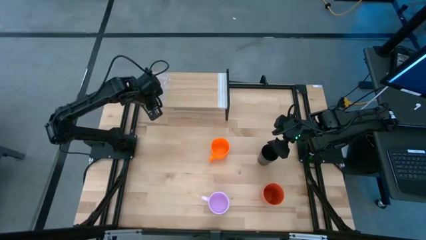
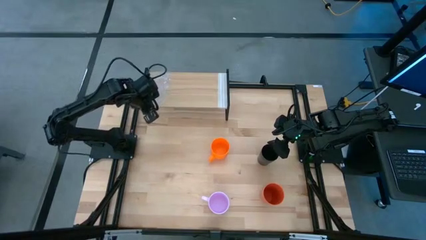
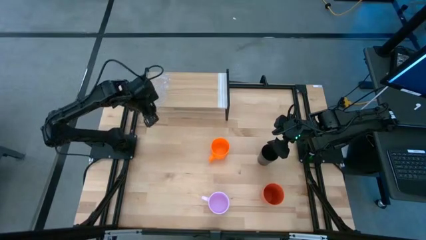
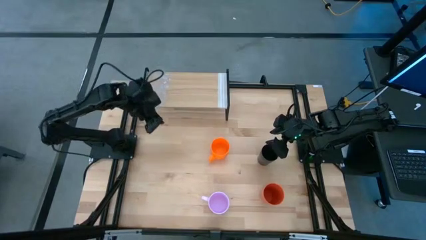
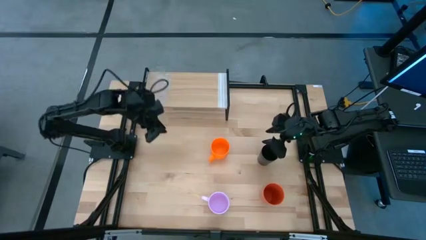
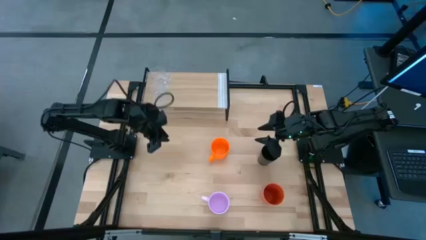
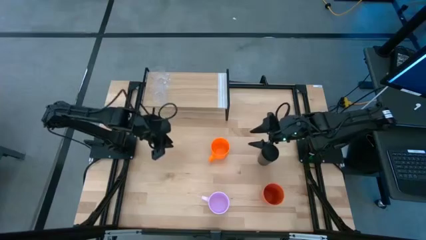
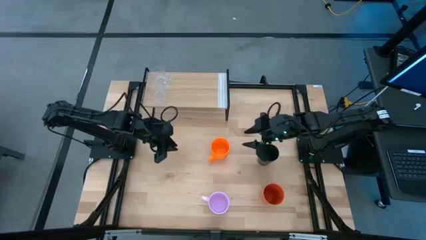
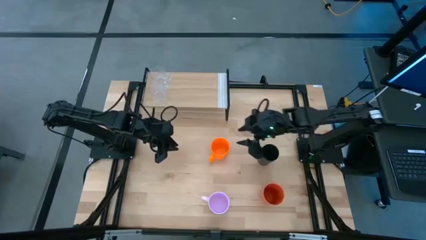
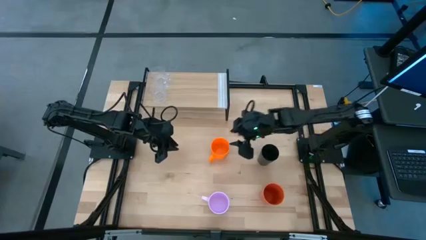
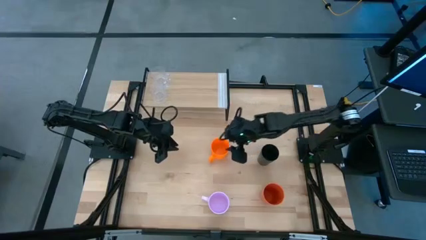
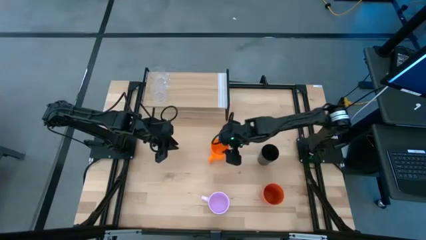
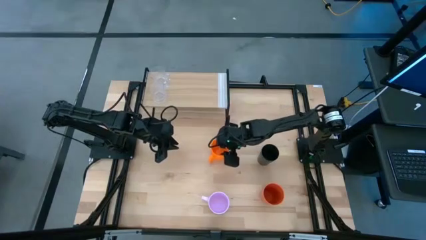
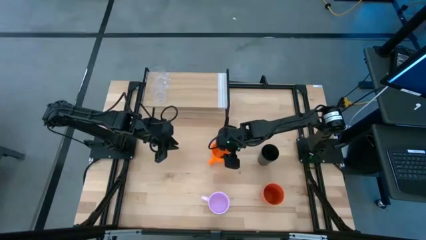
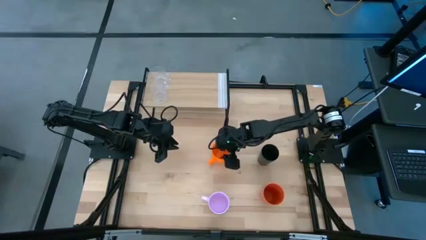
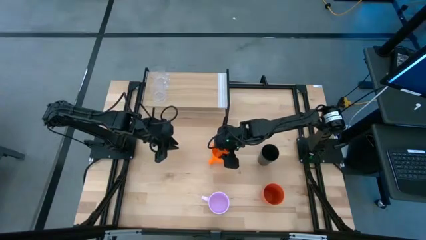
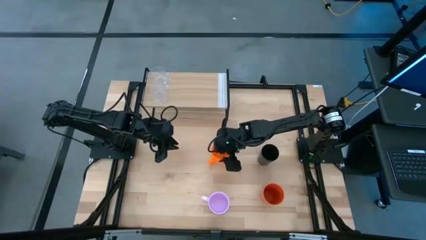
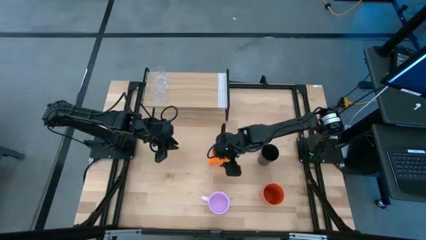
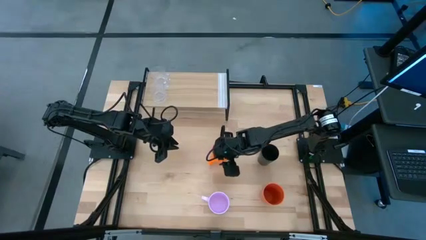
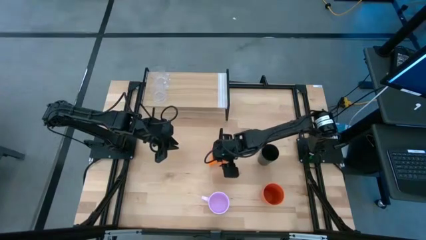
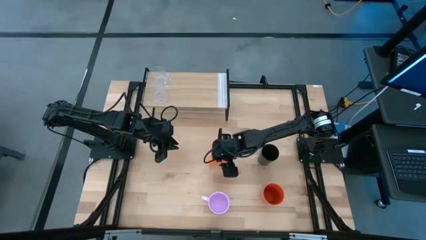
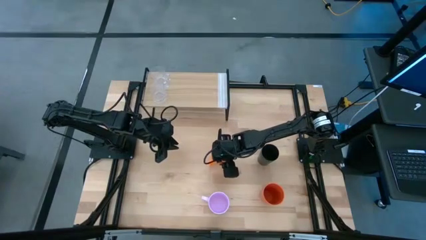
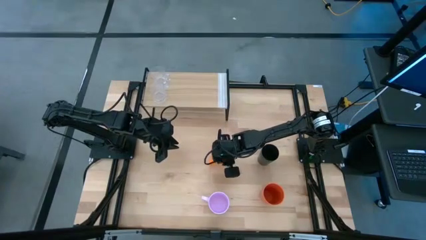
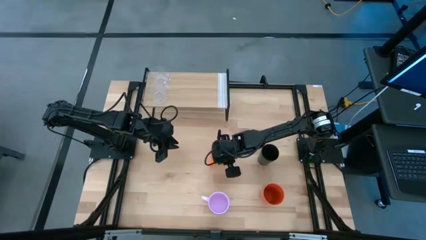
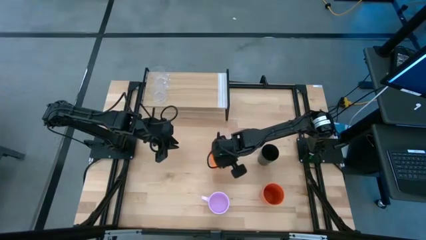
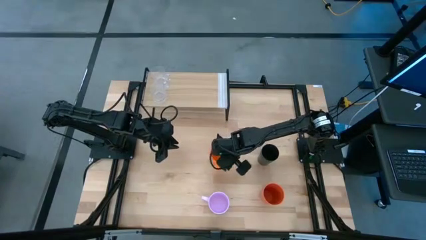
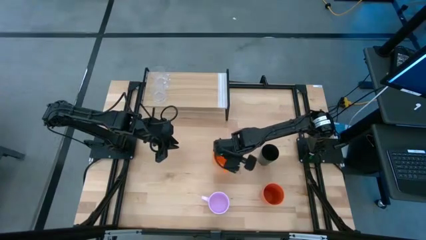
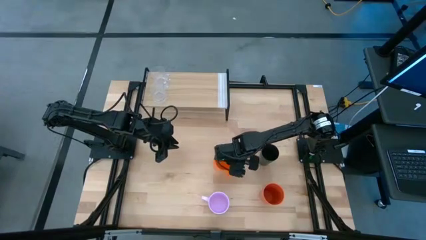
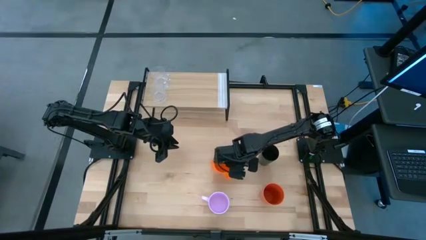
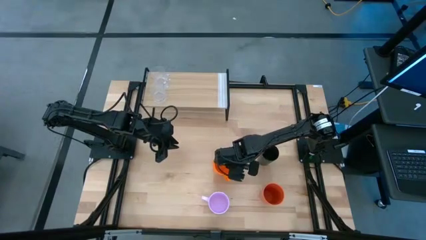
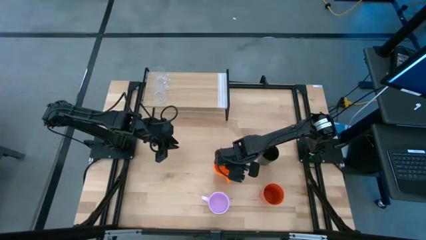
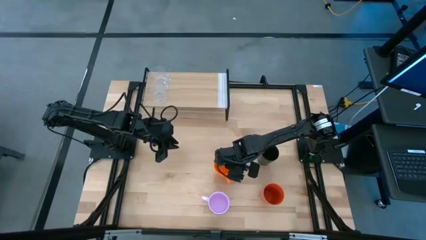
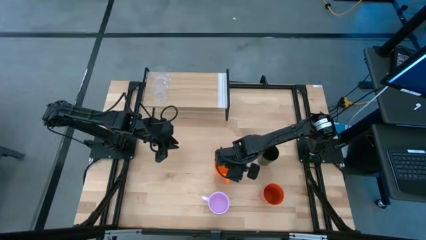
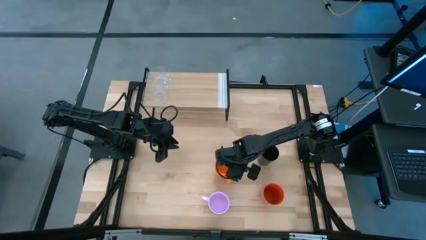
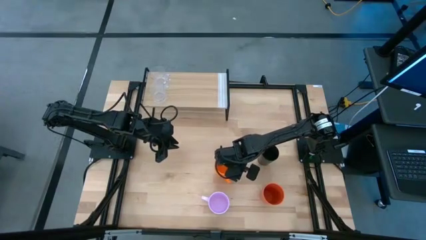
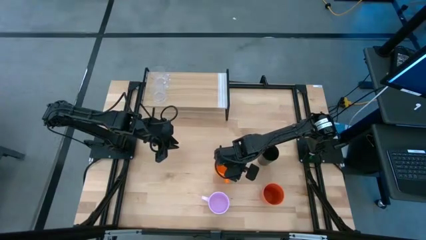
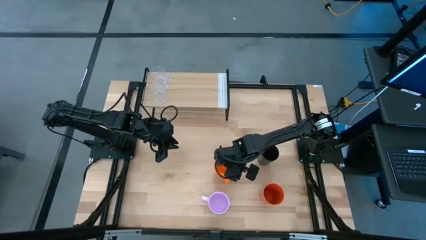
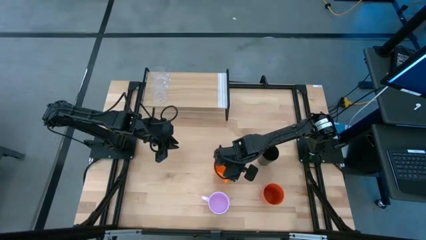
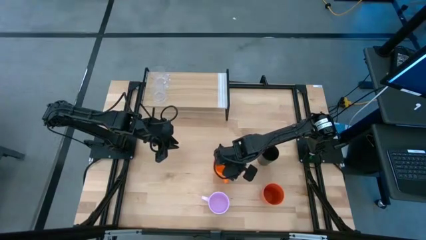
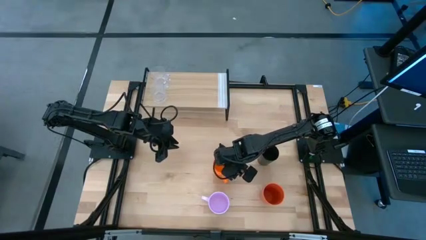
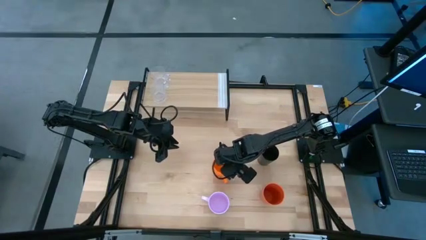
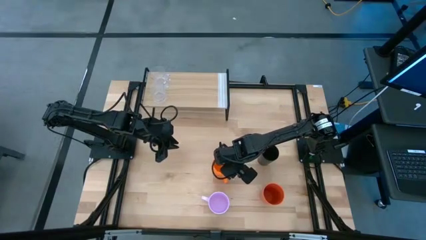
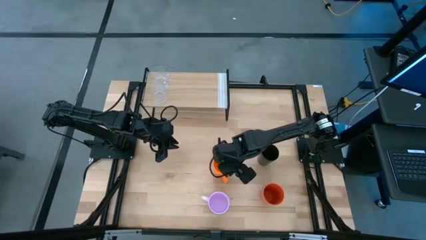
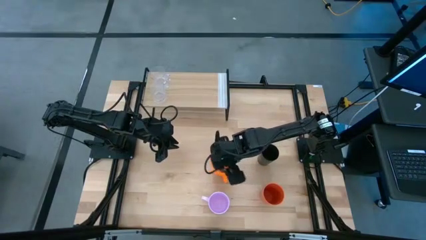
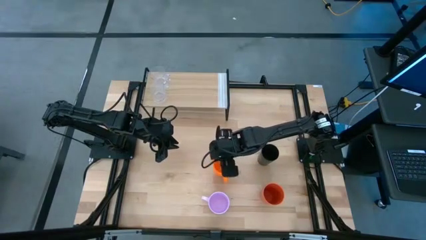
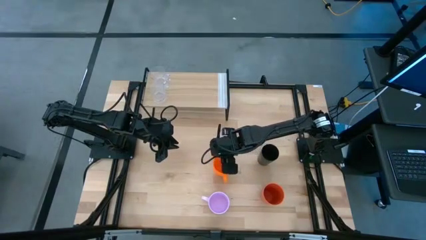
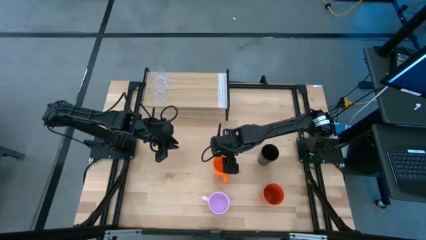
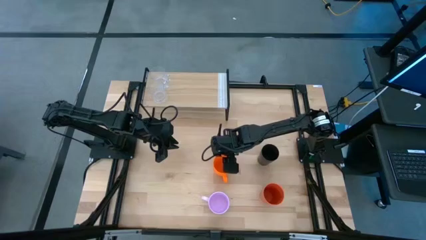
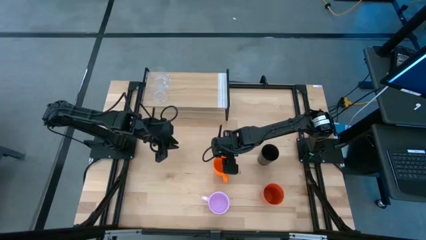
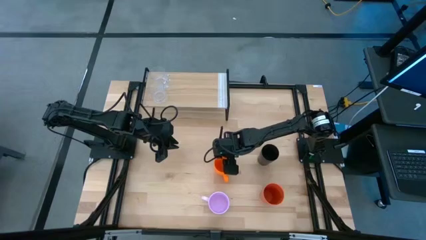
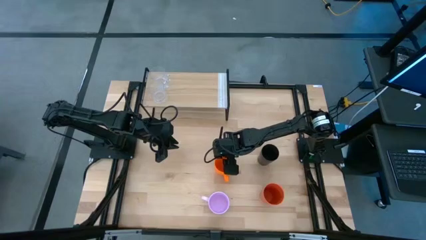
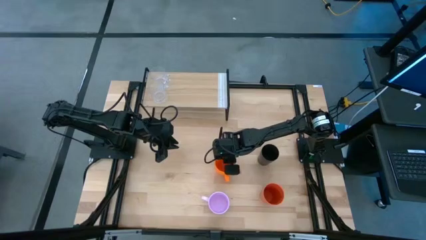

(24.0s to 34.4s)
Task: Stack small to large cups/mugs on shelf
Put the orange mug on the shelf
